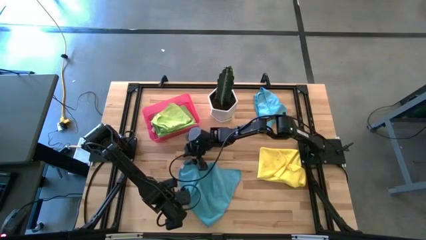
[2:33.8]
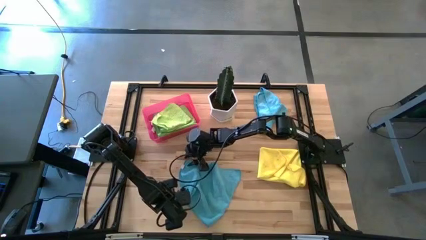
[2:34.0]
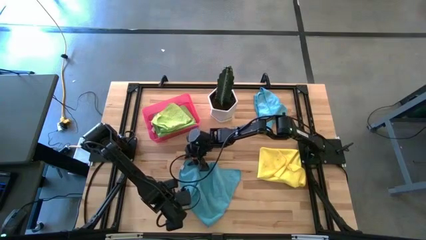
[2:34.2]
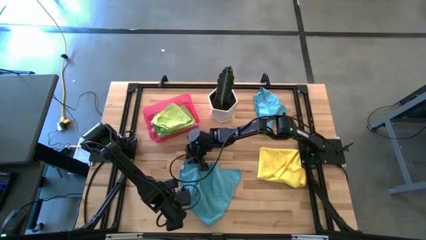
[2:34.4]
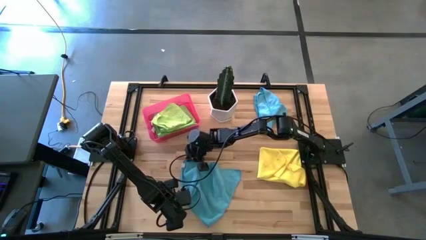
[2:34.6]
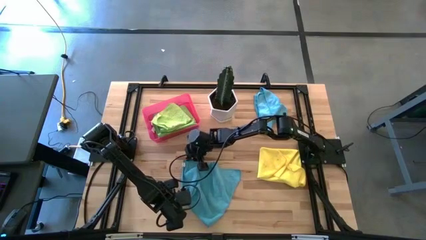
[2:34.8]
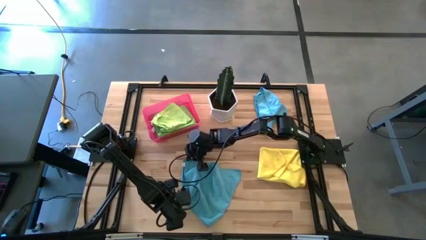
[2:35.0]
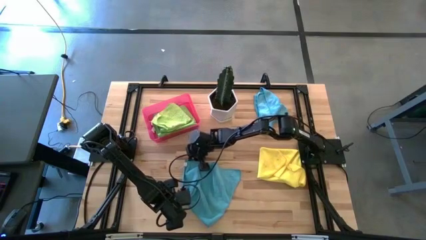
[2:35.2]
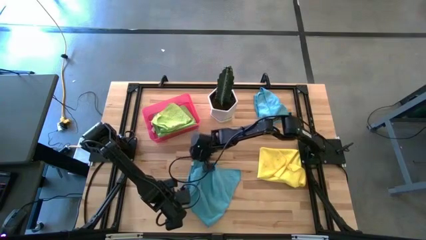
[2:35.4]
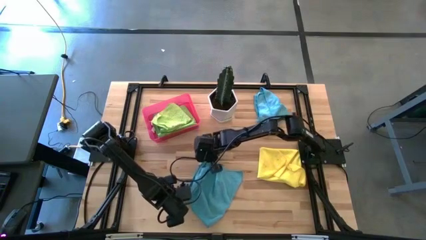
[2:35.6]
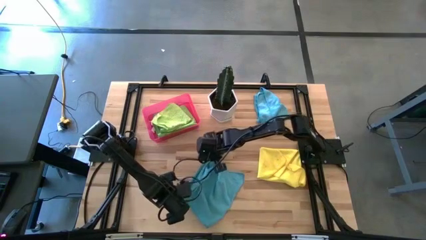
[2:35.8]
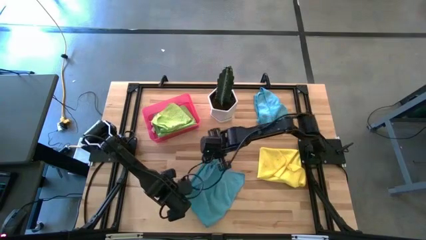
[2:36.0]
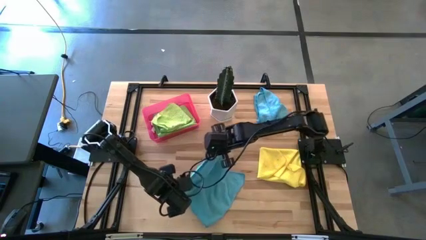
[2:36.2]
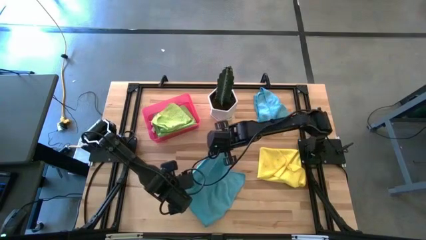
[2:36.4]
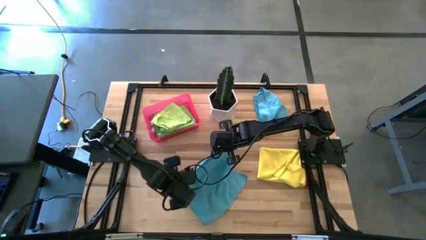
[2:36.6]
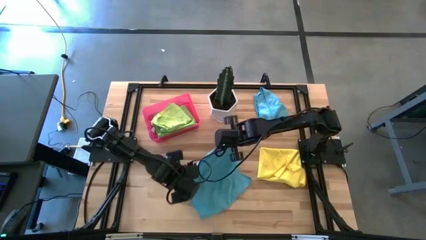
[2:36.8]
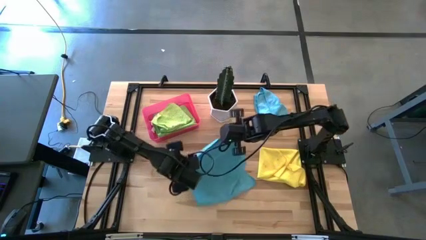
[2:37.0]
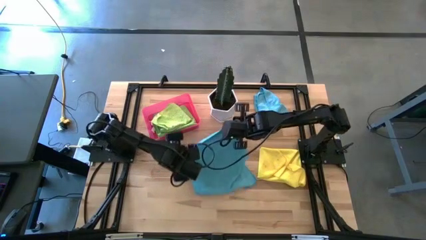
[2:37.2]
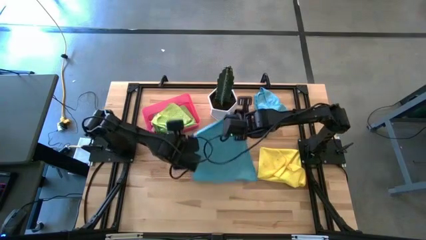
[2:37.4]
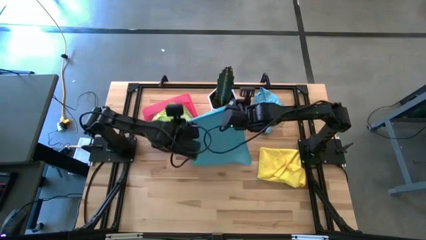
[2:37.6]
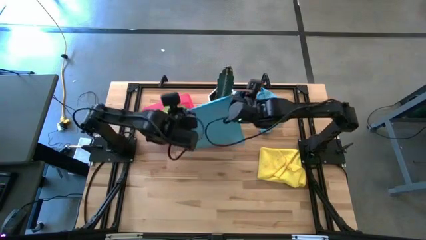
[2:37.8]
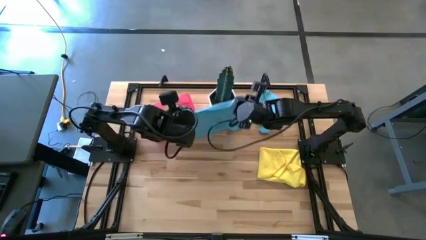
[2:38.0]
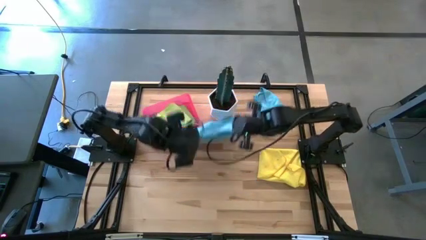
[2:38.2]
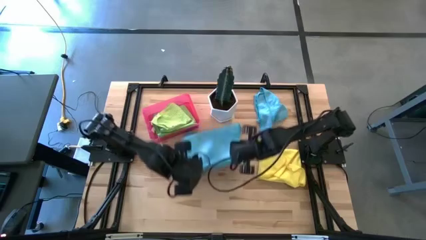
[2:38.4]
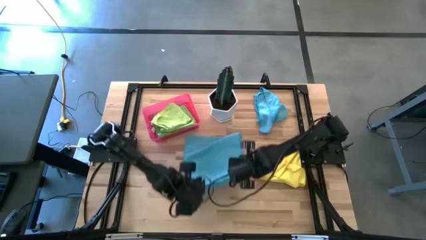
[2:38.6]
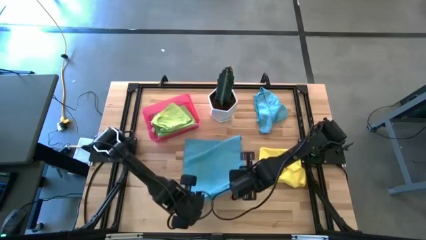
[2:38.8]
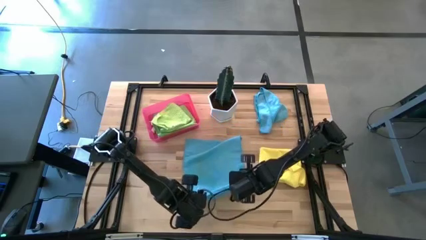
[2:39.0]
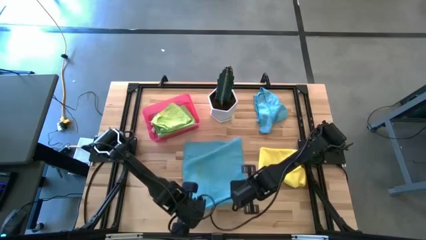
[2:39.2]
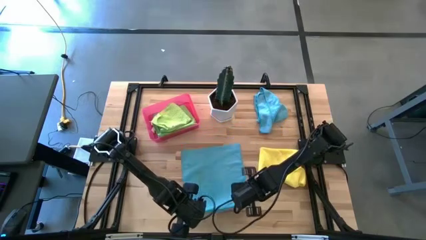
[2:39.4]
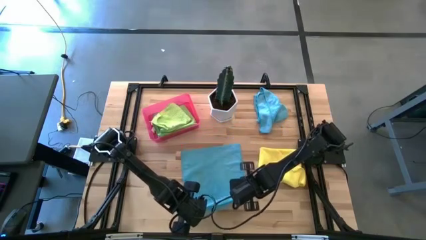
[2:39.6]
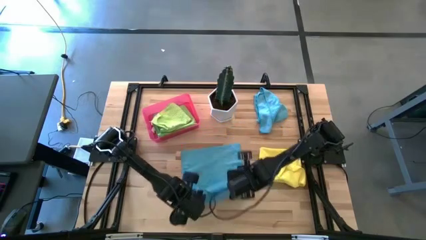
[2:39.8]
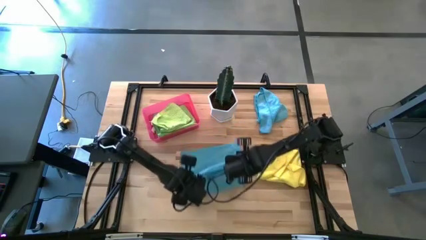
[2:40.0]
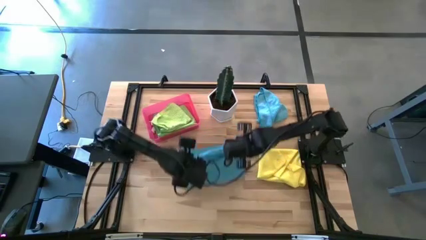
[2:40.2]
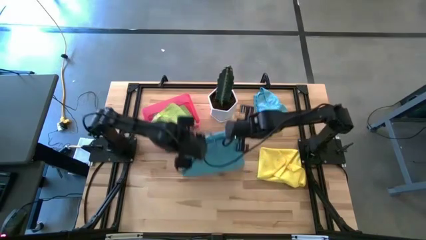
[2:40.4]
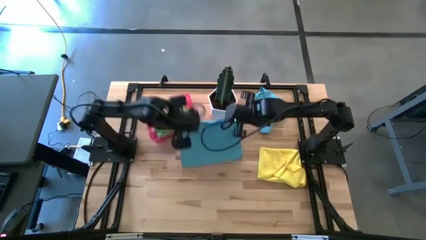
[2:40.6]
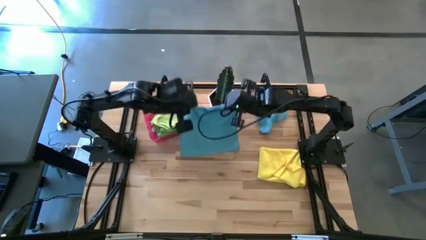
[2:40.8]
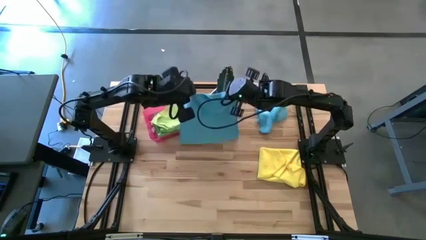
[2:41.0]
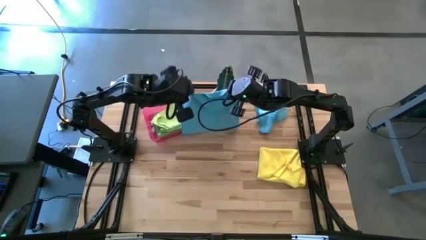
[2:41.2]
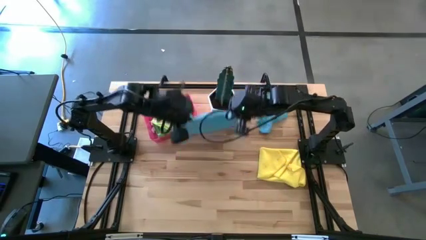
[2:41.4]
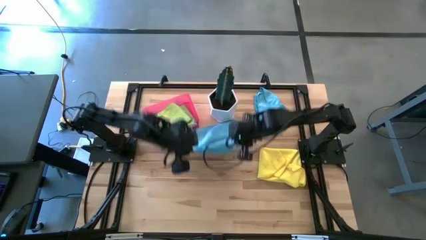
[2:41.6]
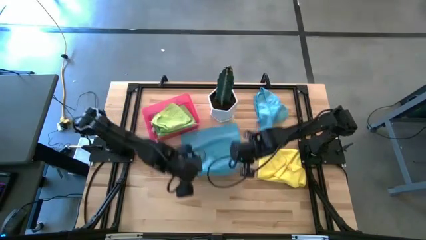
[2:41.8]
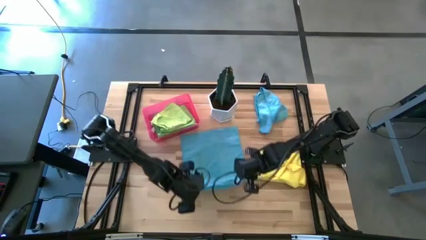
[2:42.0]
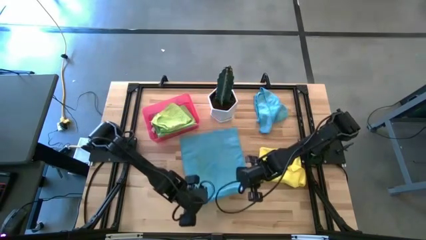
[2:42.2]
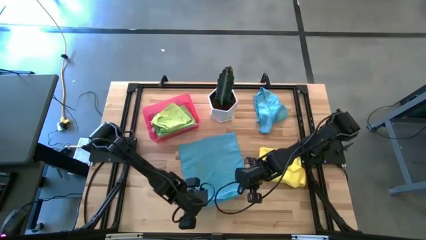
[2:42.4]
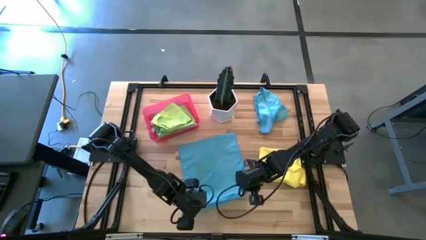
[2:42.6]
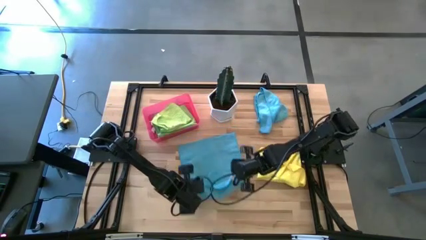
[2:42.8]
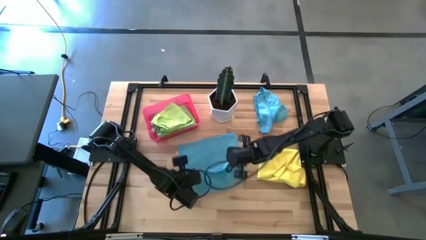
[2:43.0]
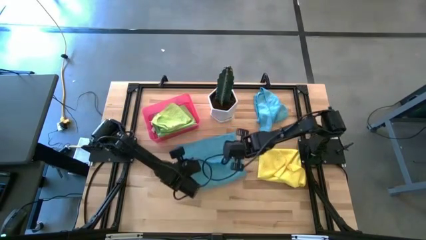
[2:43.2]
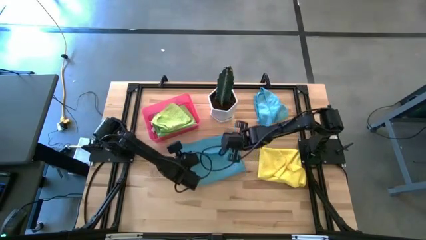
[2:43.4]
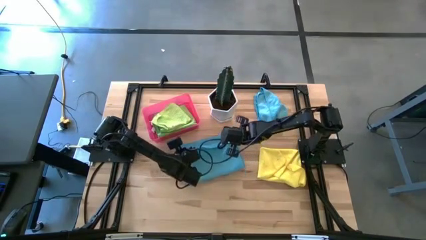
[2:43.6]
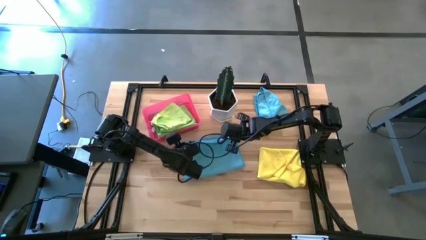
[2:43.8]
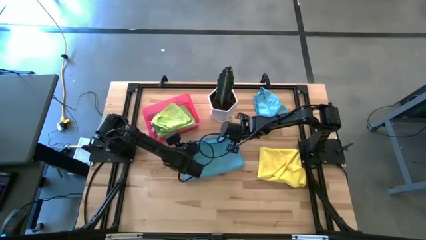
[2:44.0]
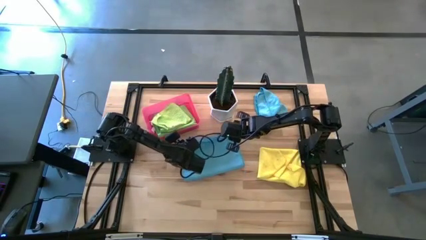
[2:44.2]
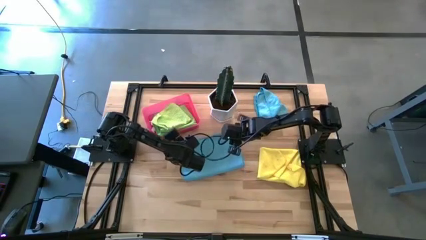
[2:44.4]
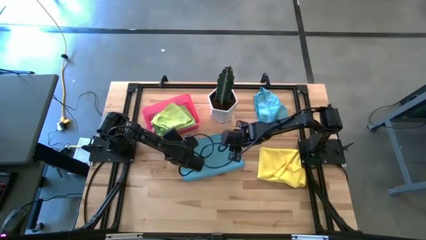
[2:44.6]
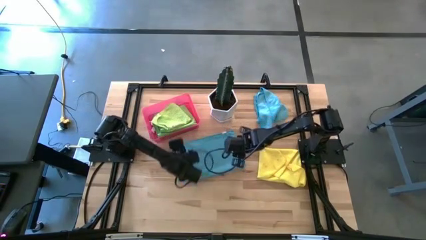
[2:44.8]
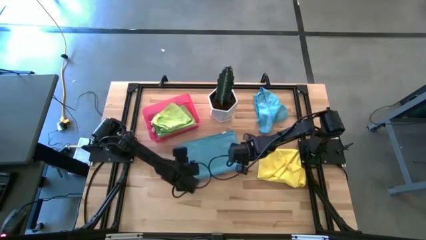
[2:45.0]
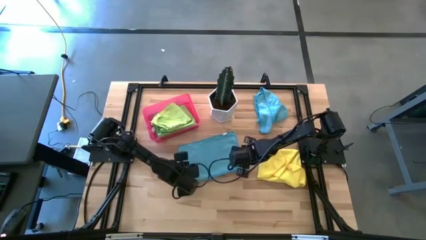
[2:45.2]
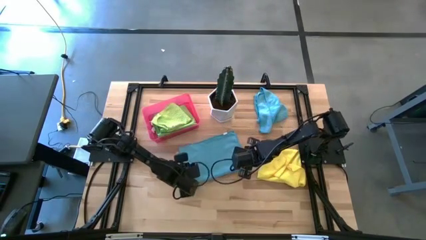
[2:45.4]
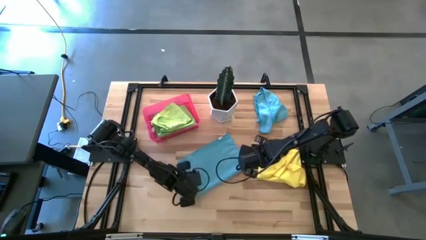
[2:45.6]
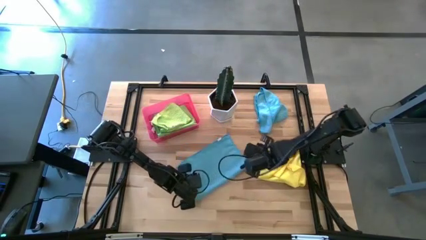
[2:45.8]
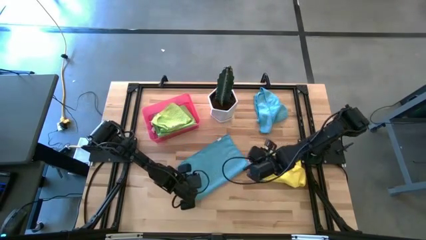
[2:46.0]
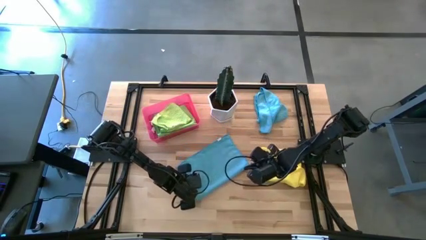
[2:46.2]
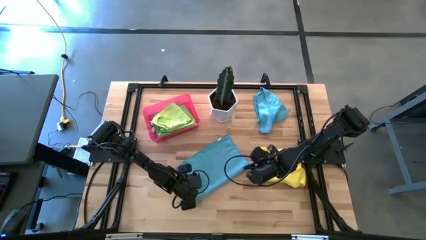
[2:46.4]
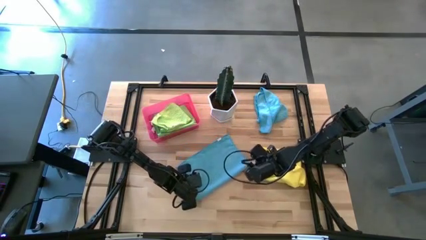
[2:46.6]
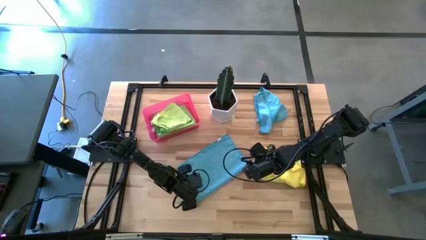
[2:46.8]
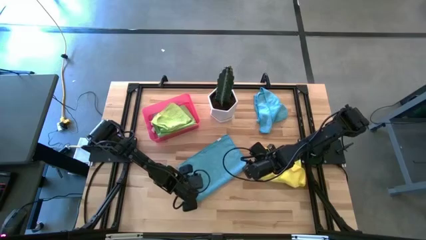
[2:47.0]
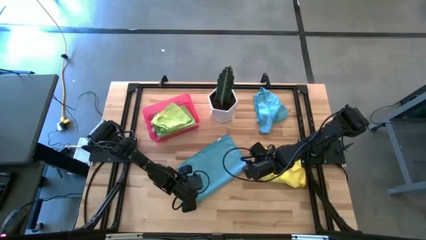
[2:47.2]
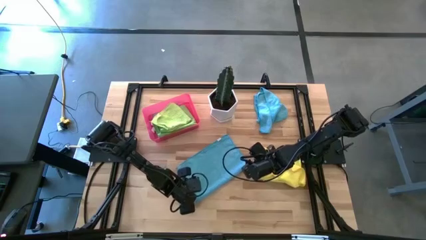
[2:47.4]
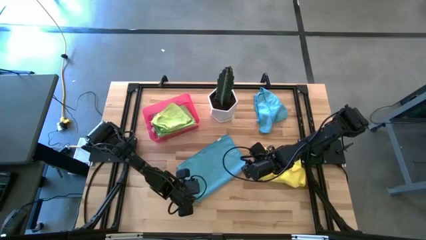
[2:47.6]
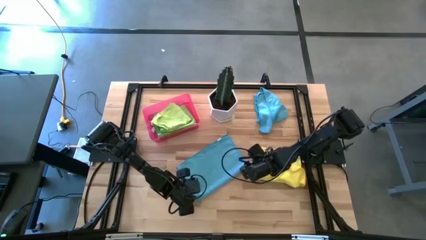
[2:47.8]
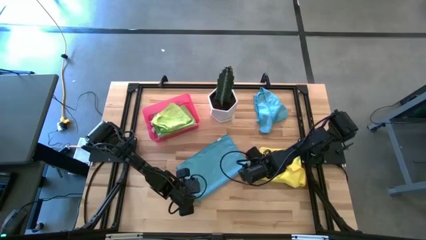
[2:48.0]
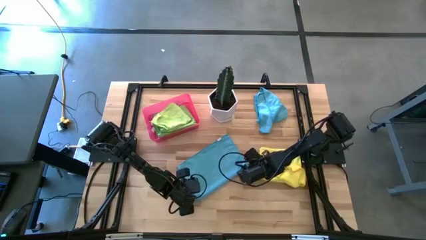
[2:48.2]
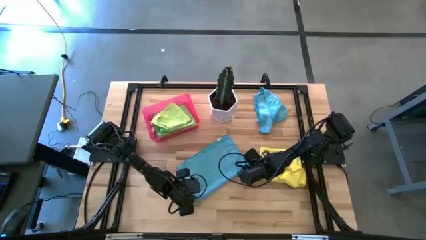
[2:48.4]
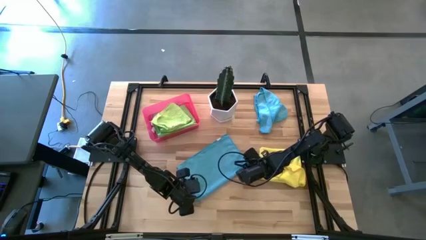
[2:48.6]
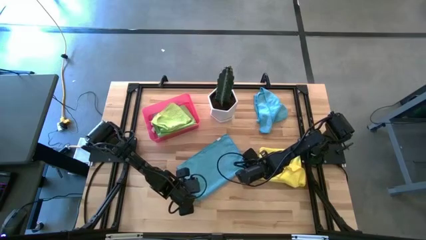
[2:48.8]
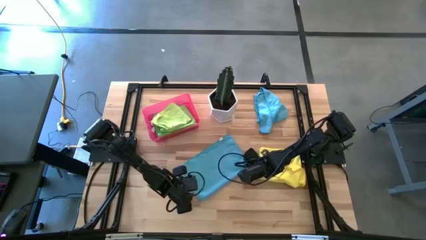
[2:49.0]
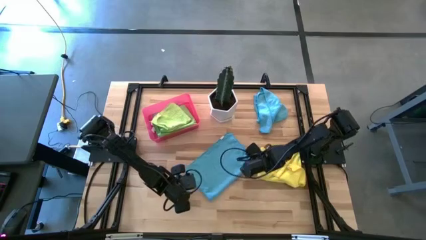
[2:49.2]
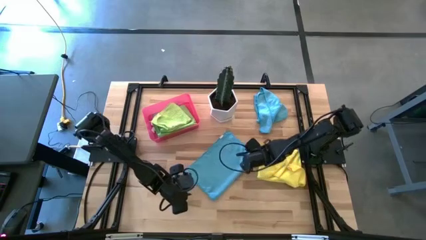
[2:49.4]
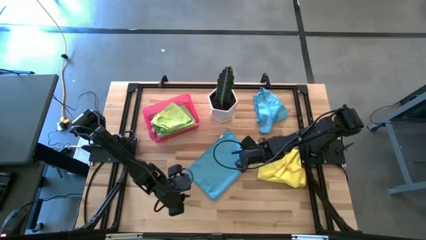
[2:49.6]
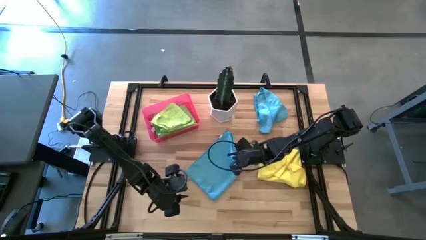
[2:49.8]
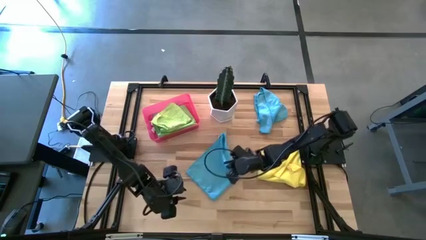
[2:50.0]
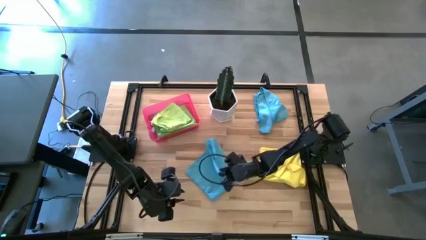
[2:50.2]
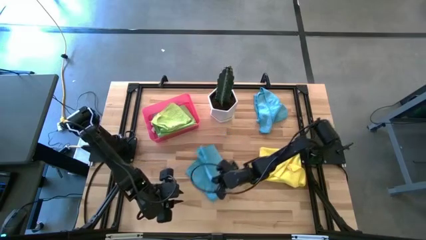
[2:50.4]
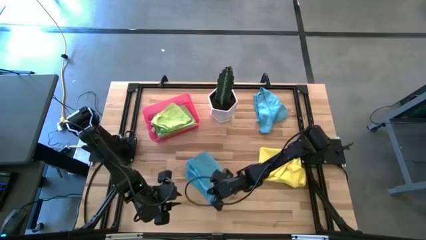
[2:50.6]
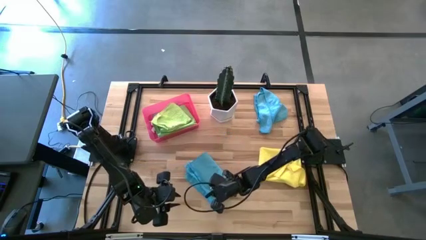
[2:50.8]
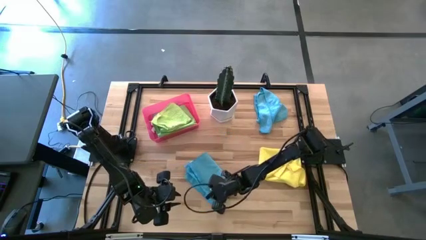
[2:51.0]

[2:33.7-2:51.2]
Task: Fold microfiber towels
Fold the bottom blue microfiber cloth
